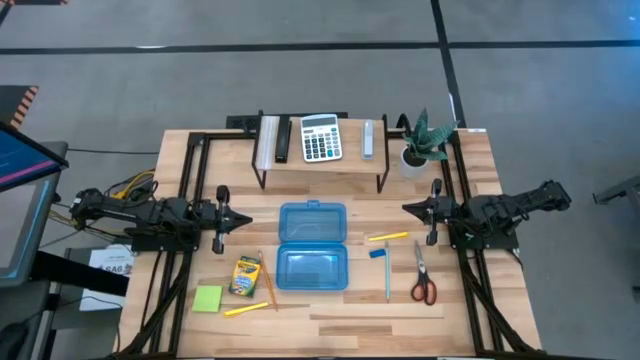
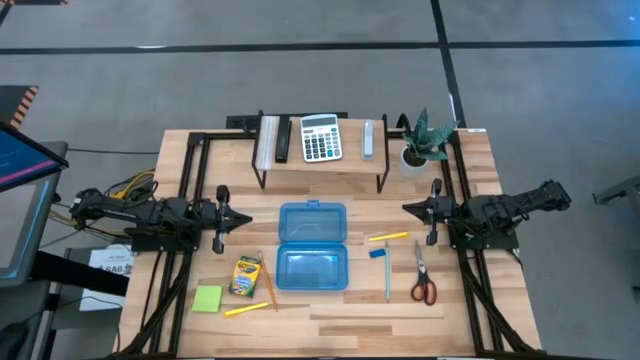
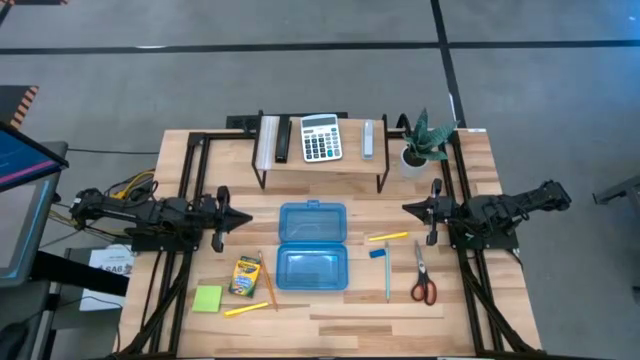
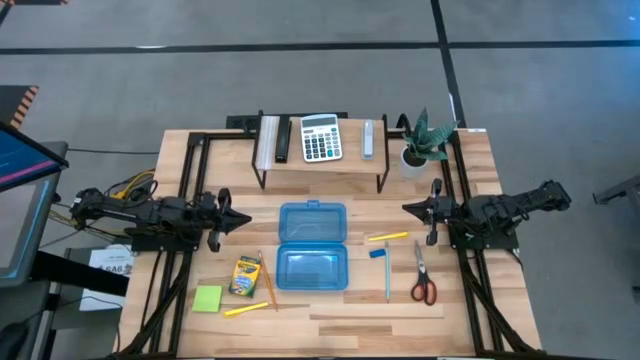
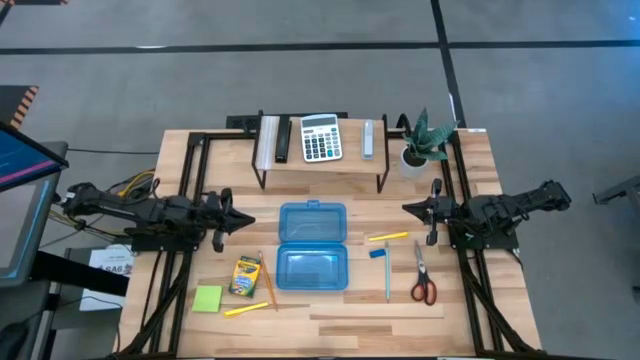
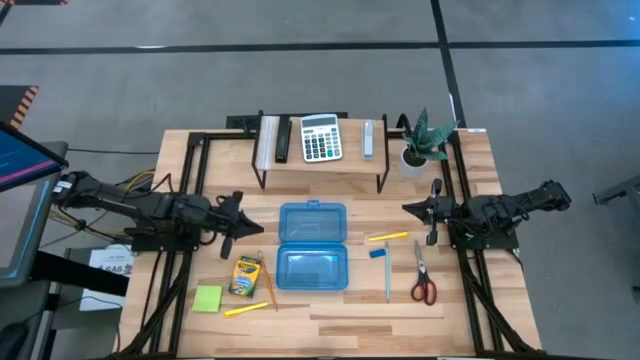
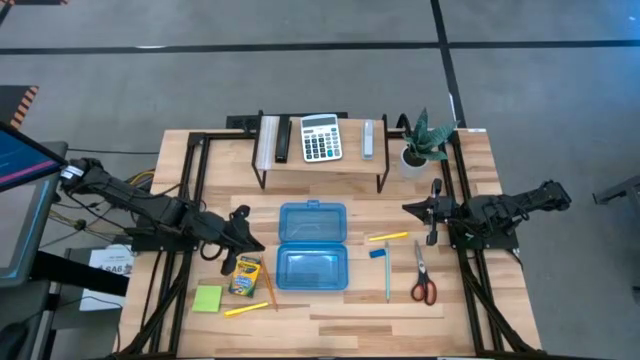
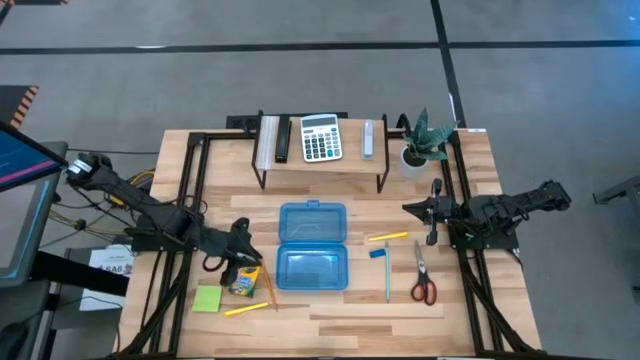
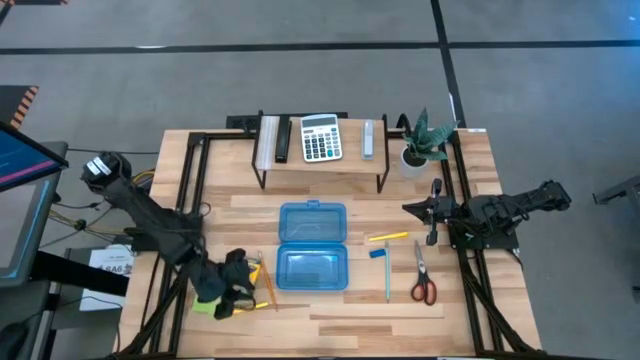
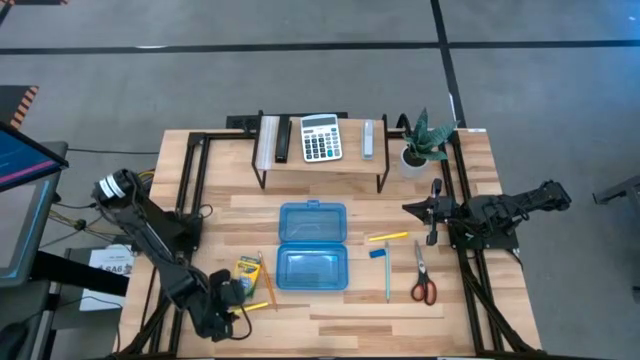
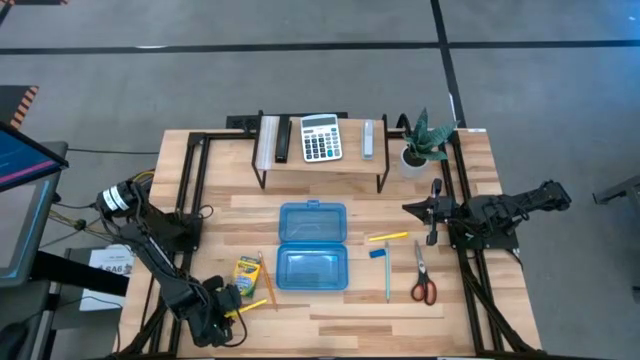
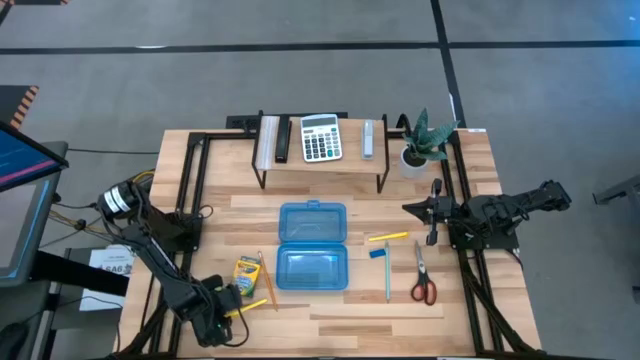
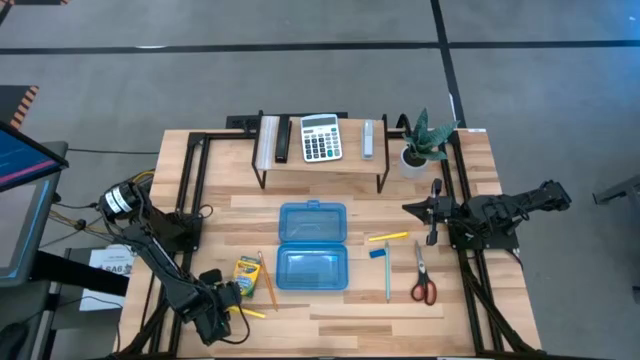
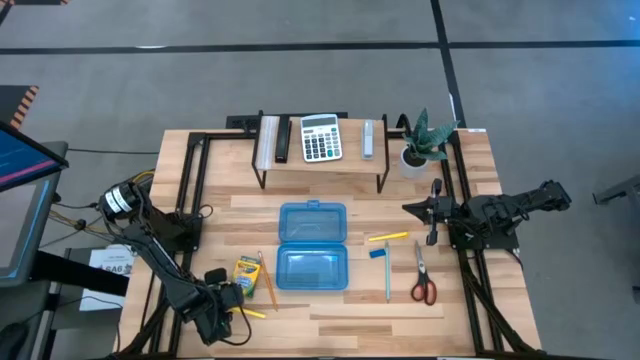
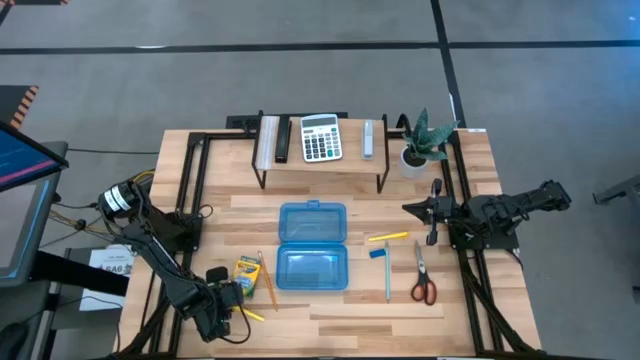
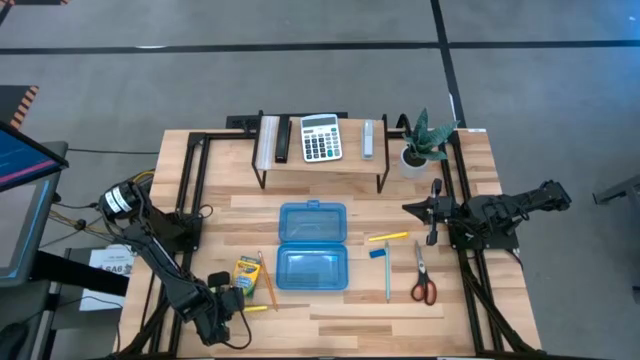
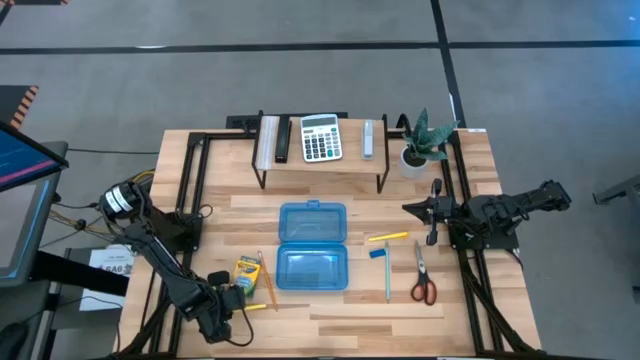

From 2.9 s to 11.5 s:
Task: Pack school essentials
Put the bottom yellow pen into the supply box

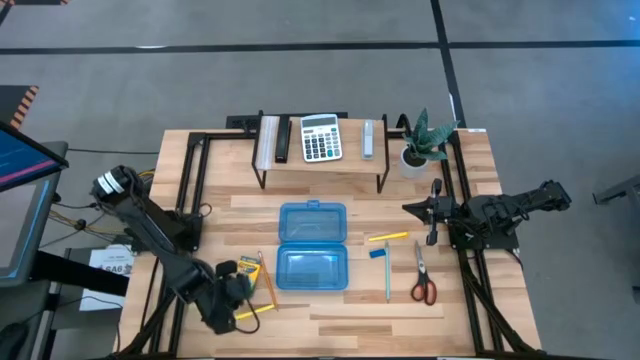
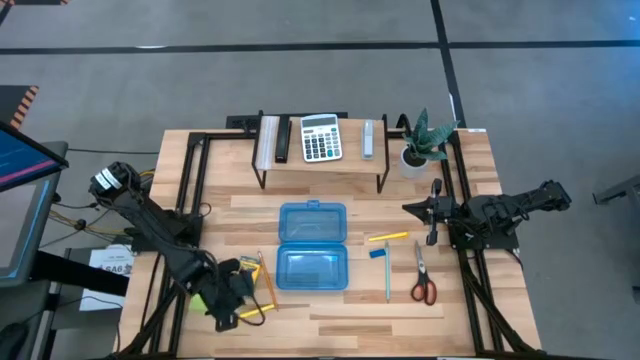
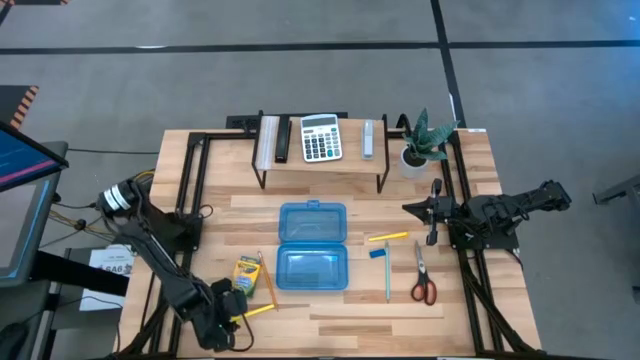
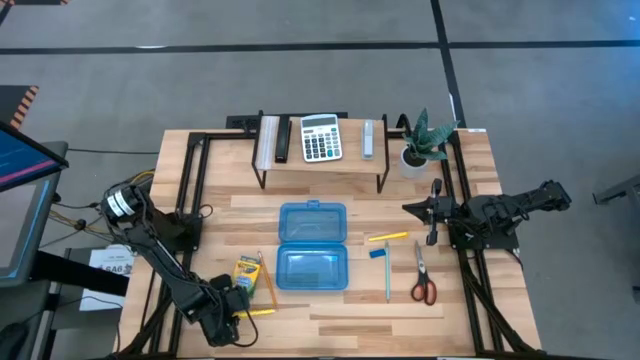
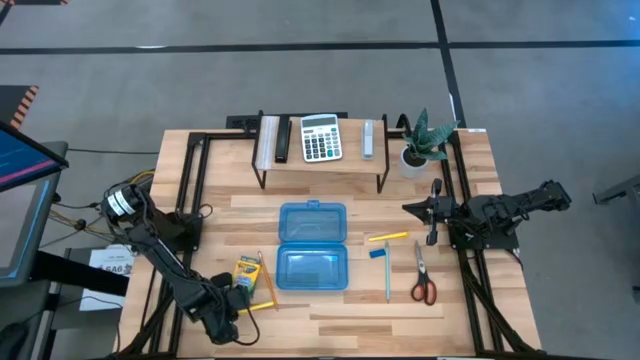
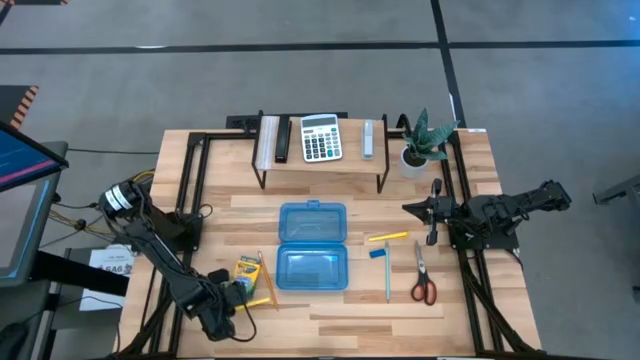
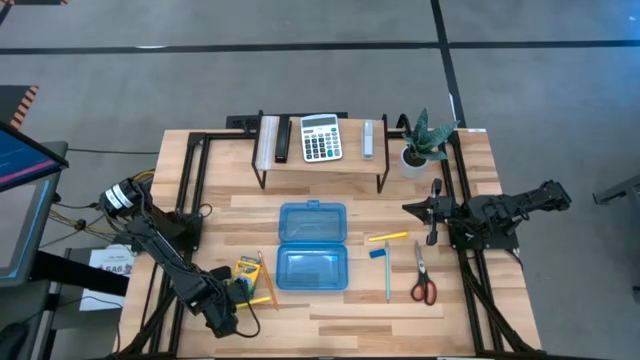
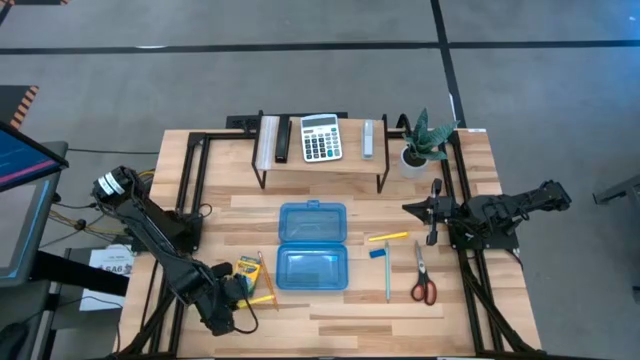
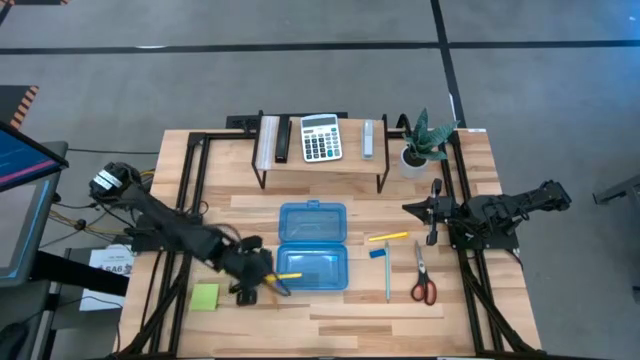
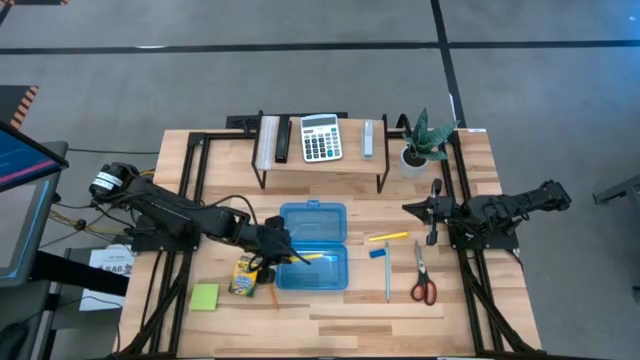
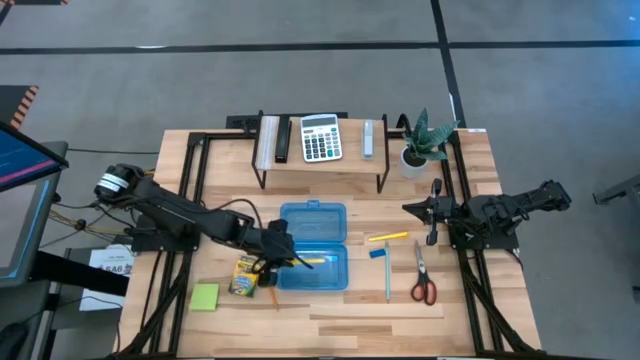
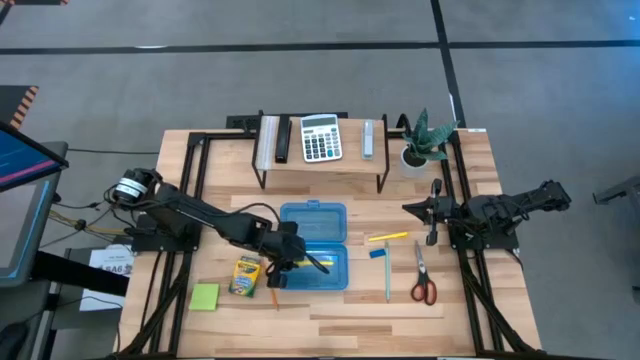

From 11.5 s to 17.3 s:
Put the bottom yellow pen into the supply box

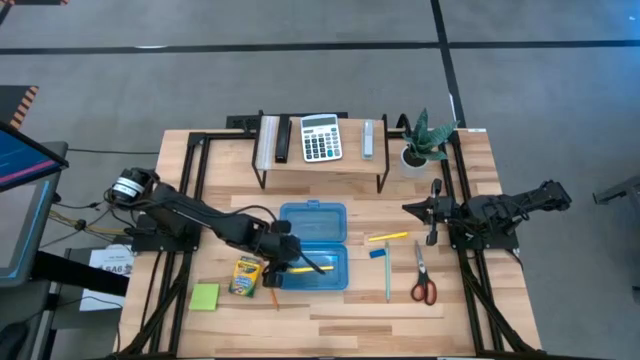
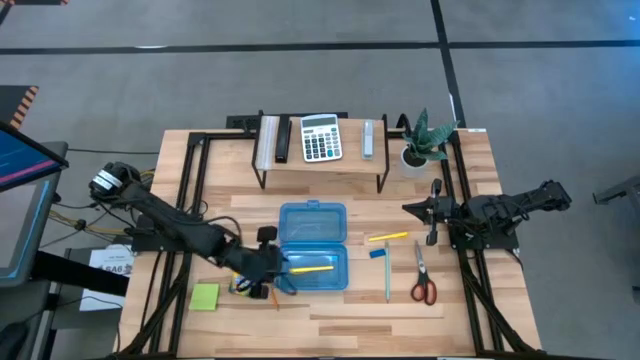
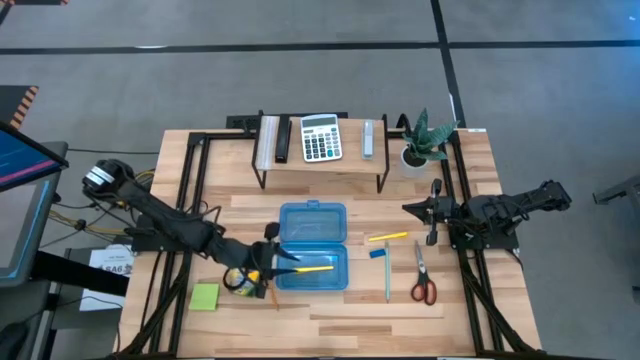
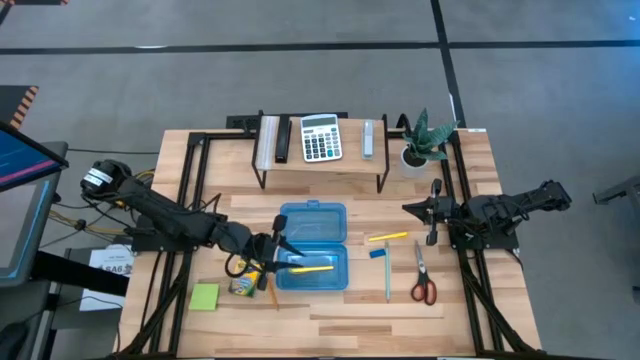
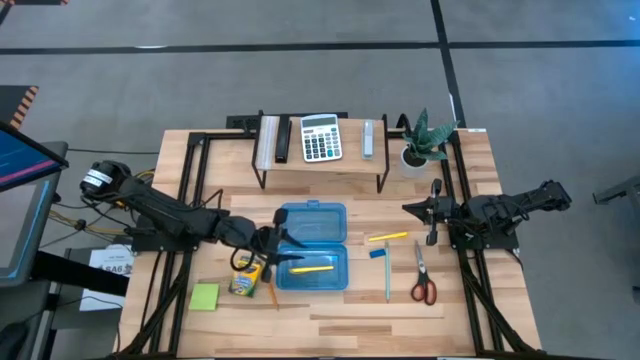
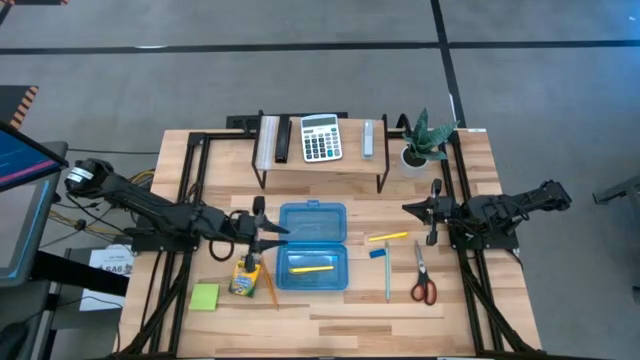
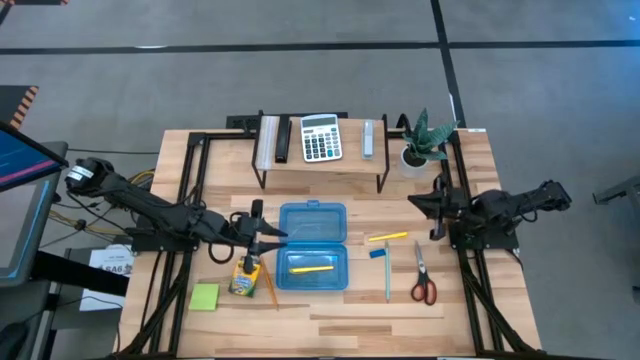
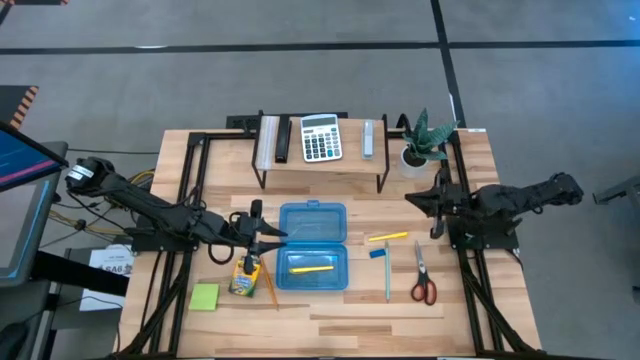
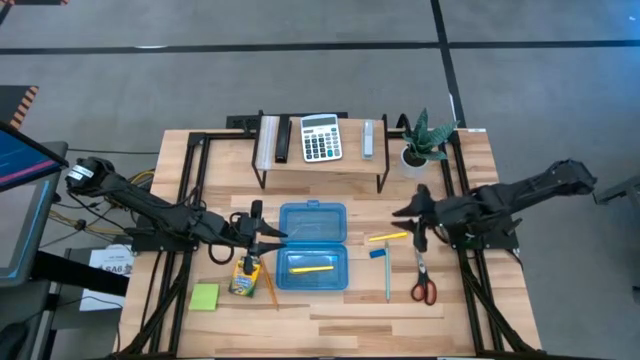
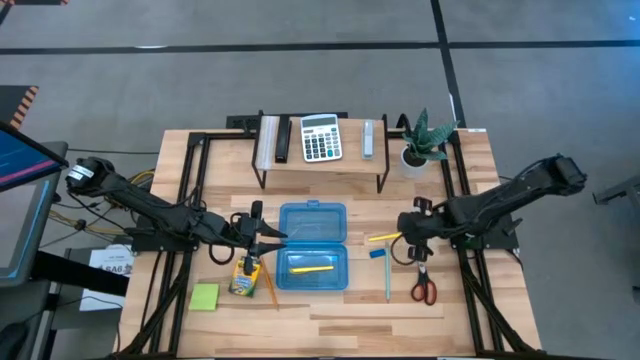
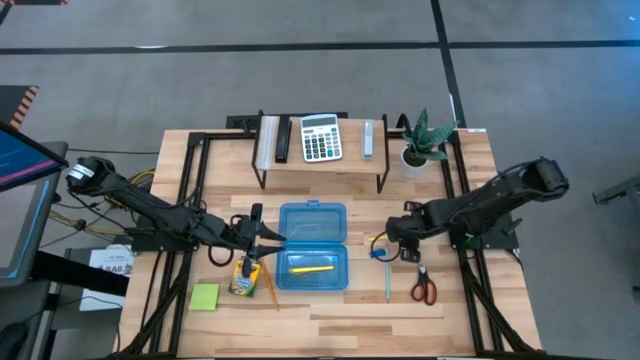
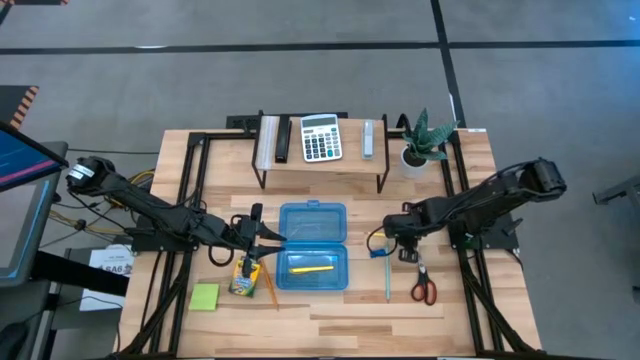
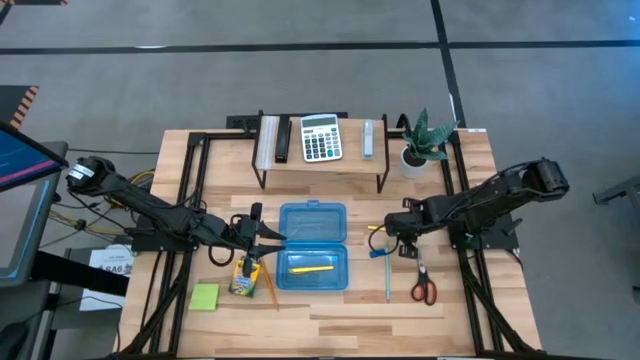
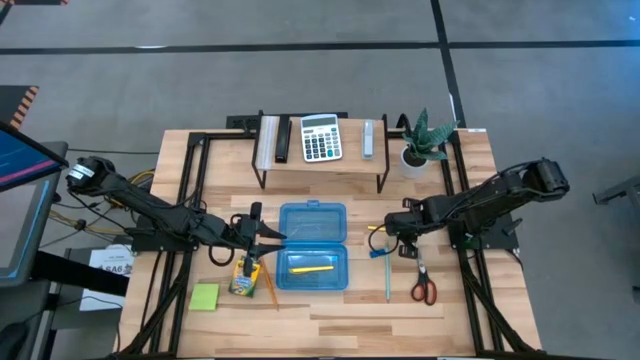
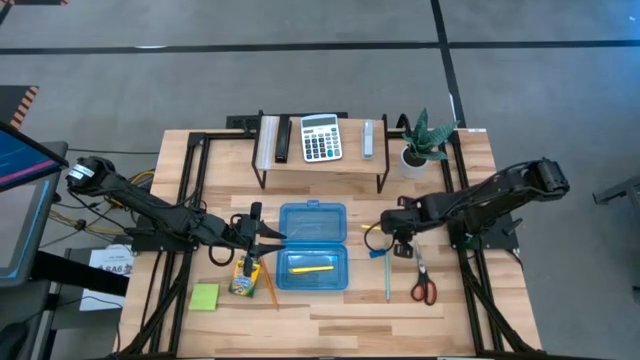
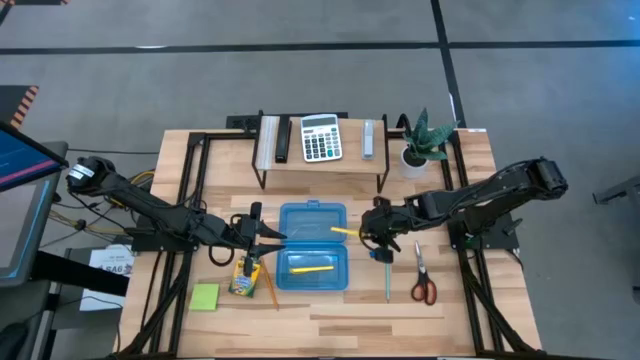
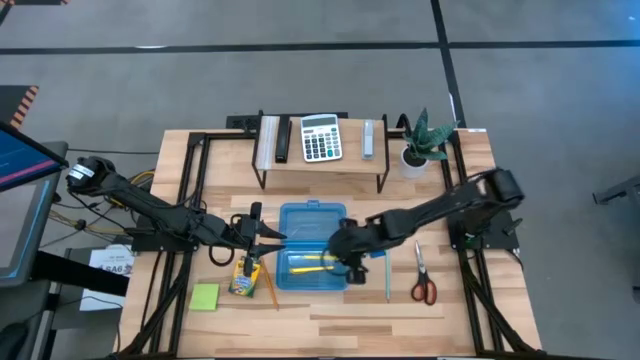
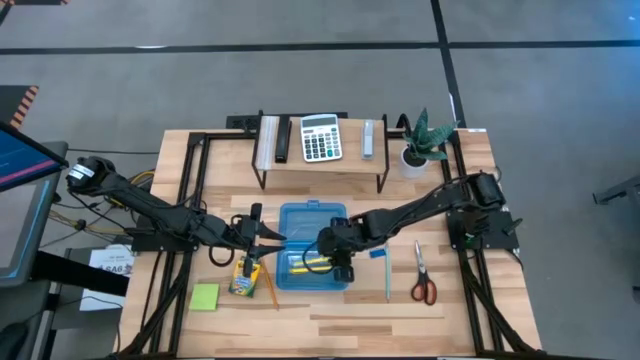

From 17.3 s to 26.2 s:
Put the yellow pen into the supply box
